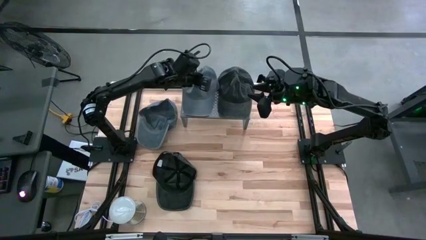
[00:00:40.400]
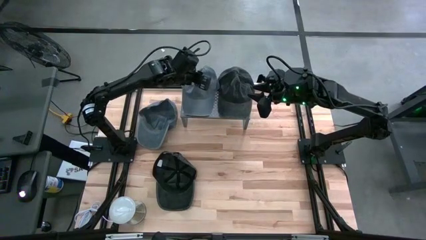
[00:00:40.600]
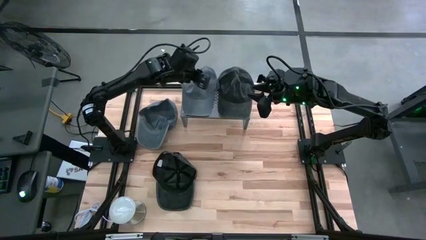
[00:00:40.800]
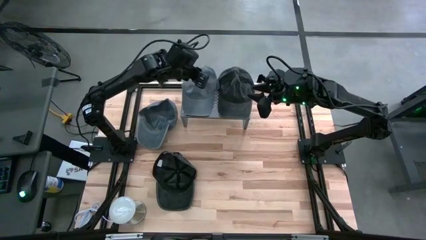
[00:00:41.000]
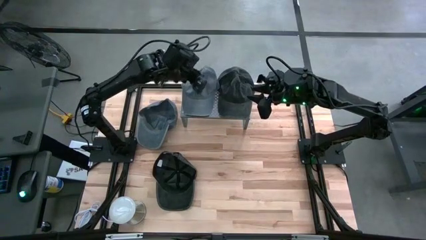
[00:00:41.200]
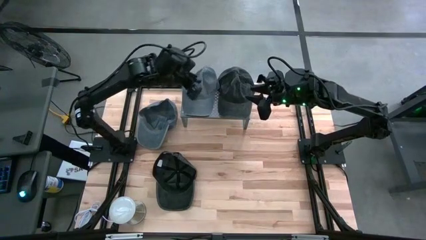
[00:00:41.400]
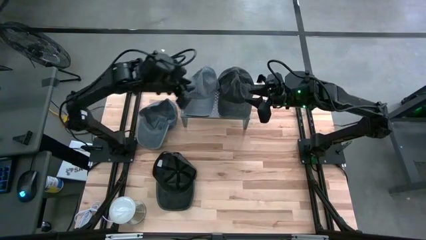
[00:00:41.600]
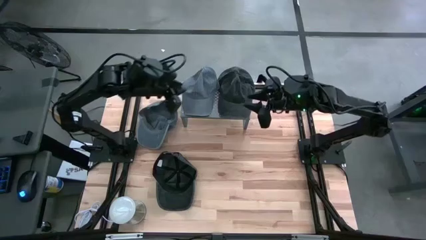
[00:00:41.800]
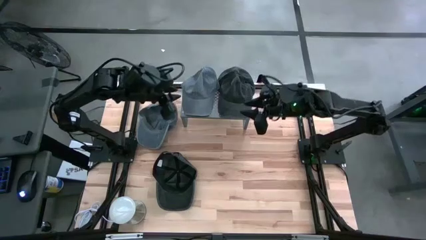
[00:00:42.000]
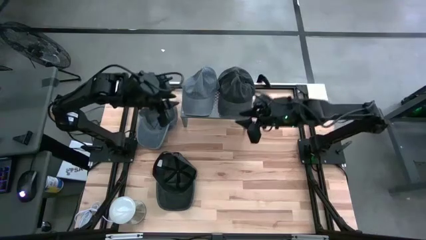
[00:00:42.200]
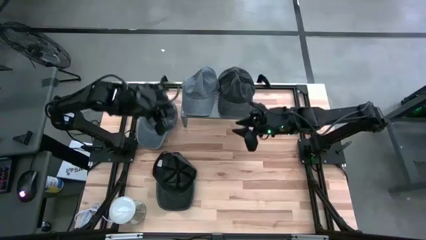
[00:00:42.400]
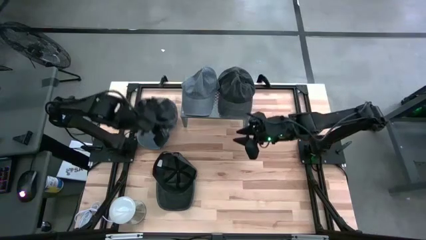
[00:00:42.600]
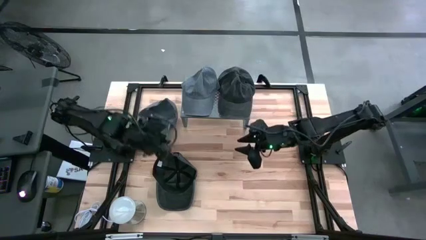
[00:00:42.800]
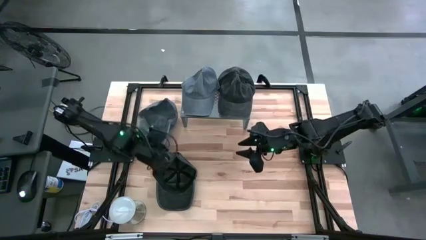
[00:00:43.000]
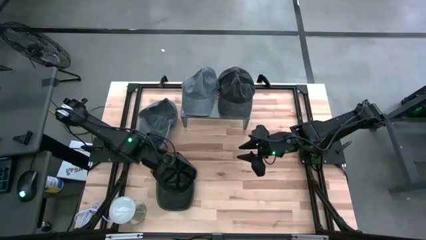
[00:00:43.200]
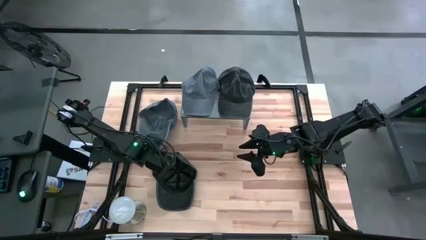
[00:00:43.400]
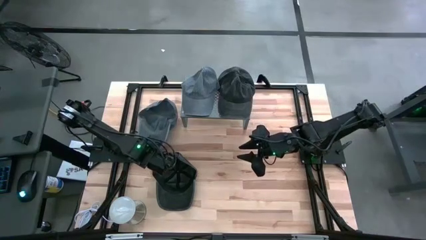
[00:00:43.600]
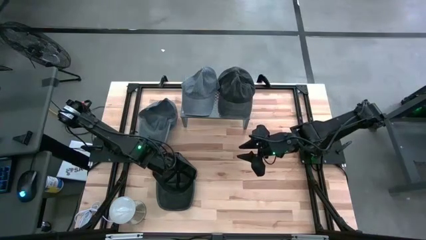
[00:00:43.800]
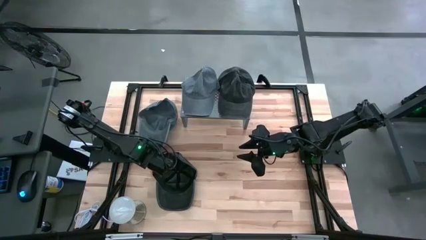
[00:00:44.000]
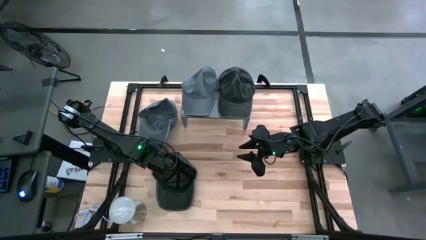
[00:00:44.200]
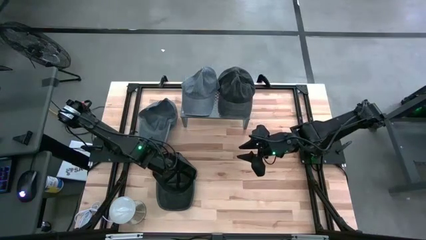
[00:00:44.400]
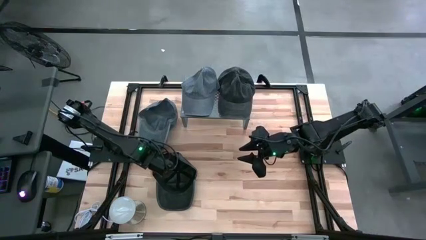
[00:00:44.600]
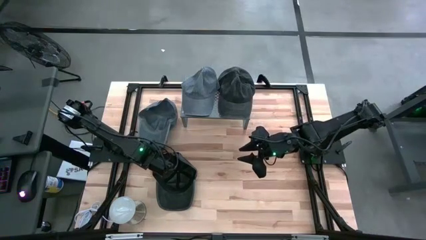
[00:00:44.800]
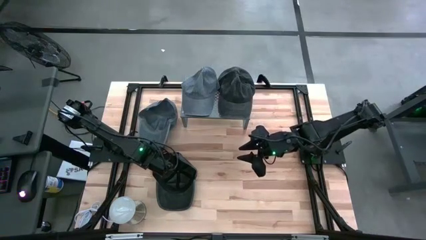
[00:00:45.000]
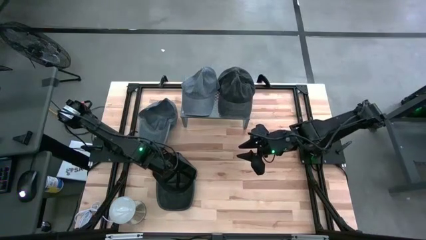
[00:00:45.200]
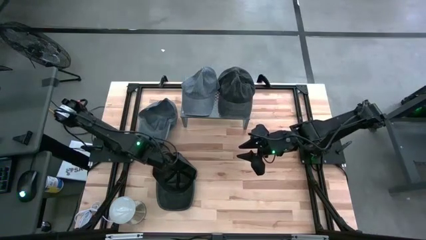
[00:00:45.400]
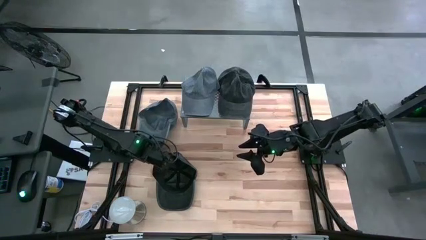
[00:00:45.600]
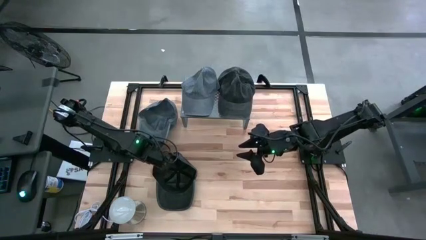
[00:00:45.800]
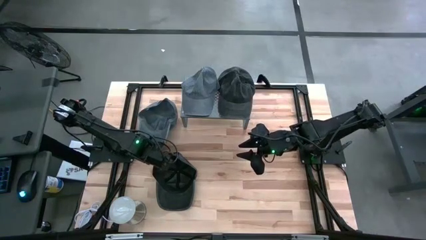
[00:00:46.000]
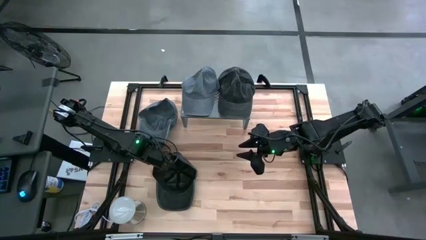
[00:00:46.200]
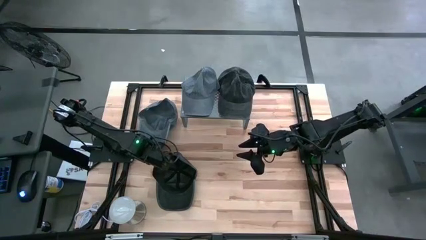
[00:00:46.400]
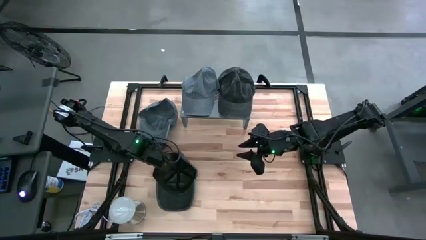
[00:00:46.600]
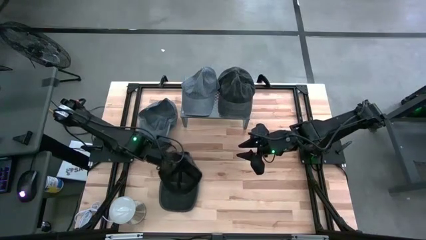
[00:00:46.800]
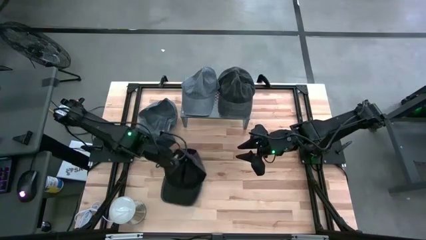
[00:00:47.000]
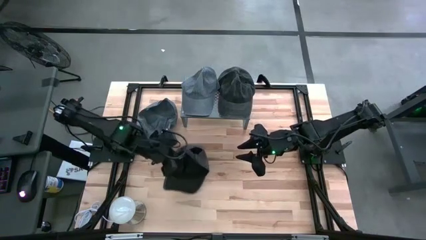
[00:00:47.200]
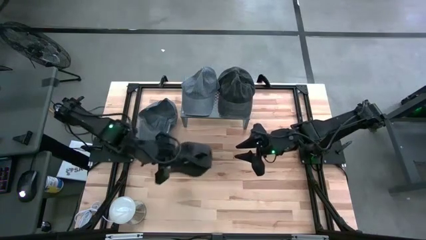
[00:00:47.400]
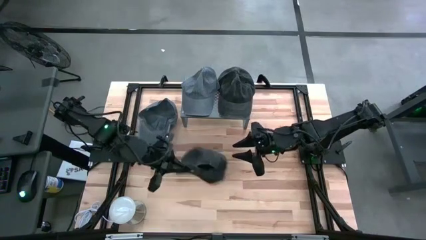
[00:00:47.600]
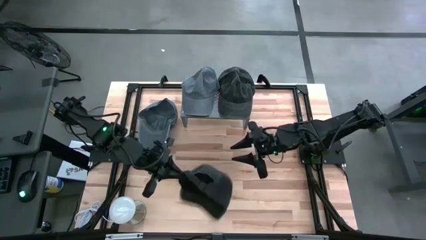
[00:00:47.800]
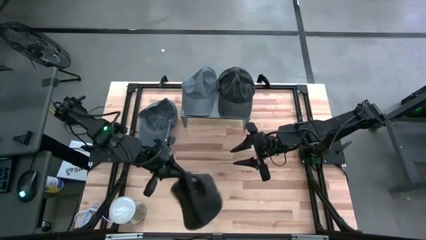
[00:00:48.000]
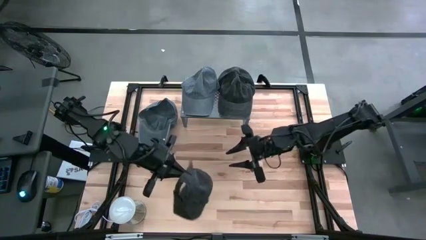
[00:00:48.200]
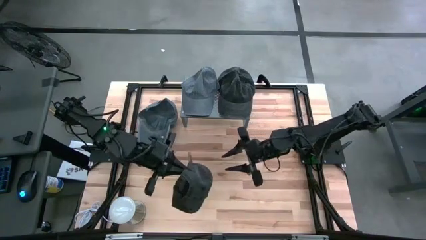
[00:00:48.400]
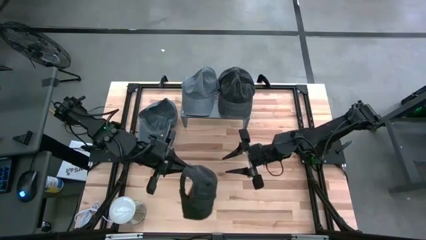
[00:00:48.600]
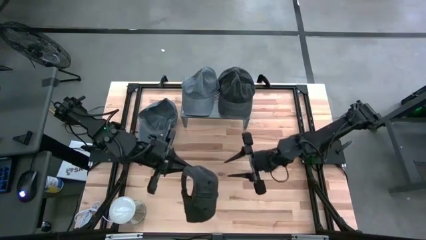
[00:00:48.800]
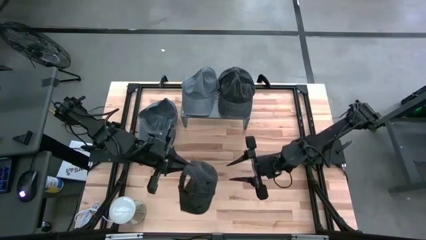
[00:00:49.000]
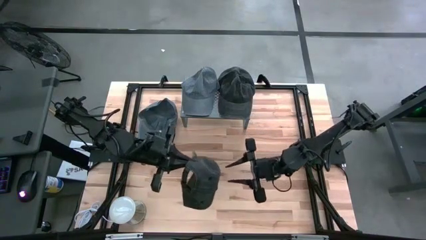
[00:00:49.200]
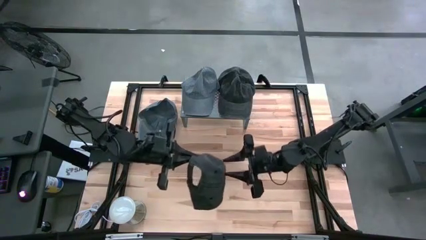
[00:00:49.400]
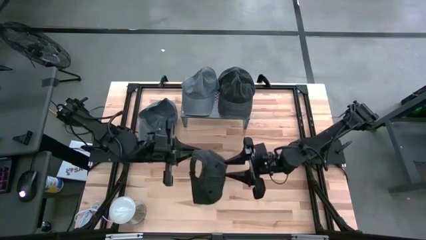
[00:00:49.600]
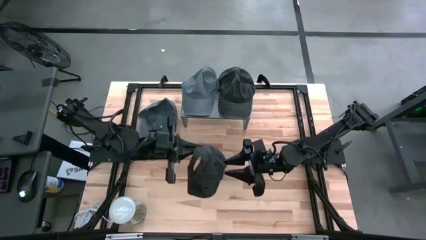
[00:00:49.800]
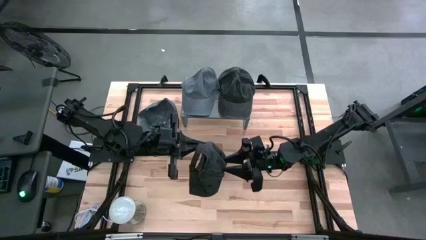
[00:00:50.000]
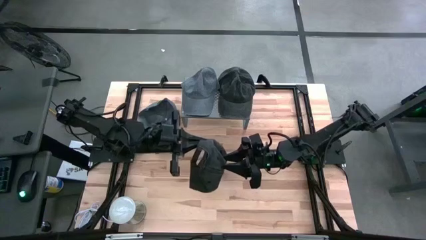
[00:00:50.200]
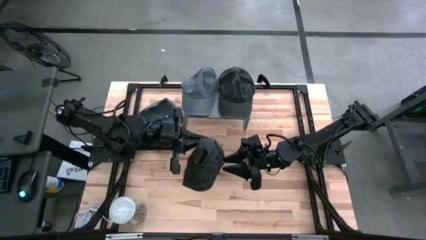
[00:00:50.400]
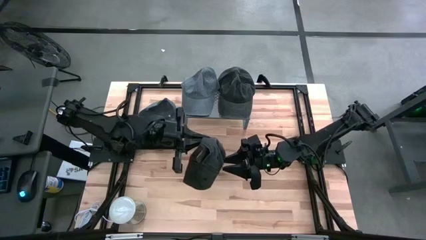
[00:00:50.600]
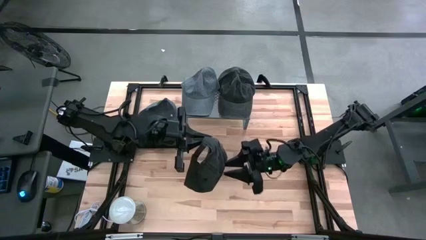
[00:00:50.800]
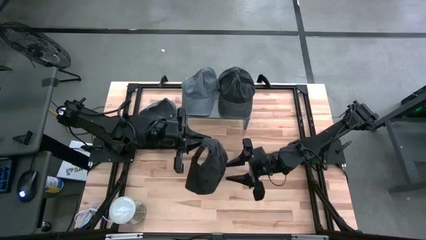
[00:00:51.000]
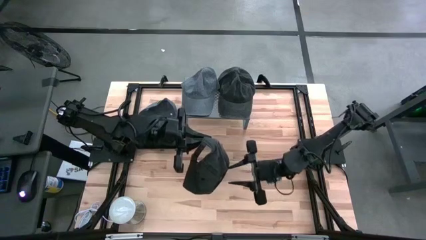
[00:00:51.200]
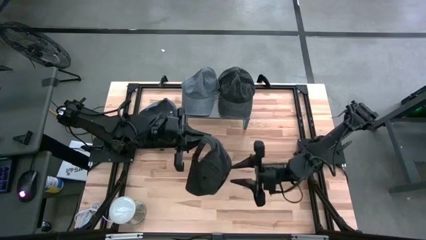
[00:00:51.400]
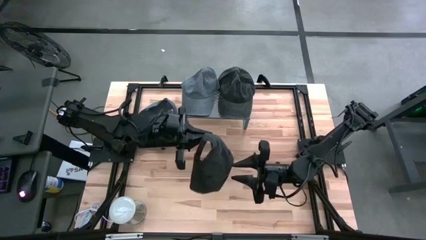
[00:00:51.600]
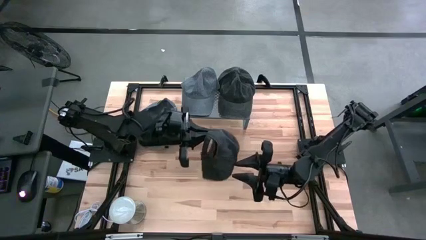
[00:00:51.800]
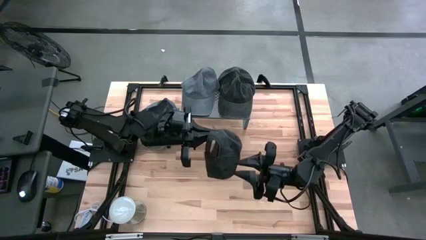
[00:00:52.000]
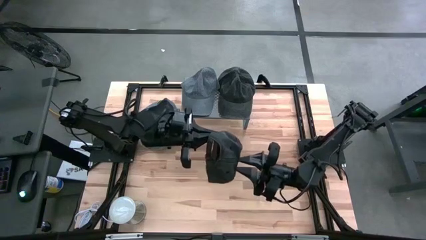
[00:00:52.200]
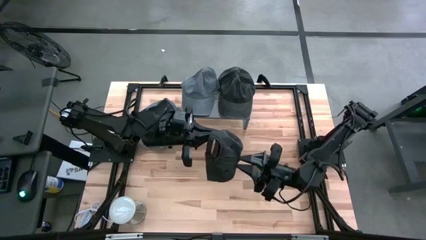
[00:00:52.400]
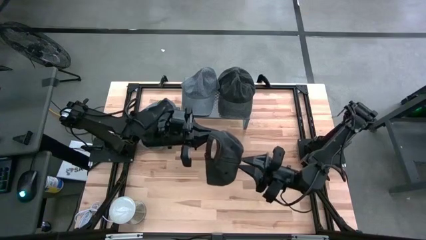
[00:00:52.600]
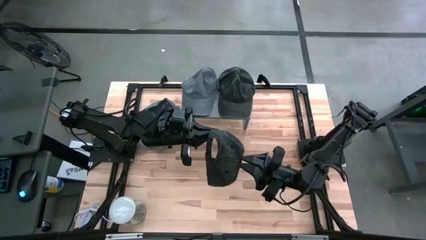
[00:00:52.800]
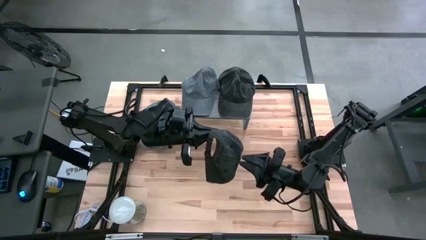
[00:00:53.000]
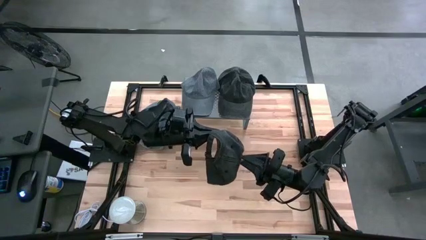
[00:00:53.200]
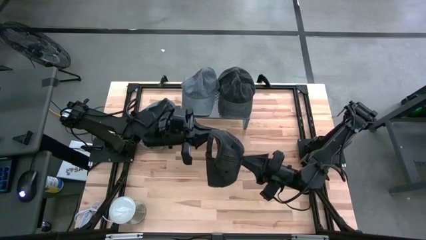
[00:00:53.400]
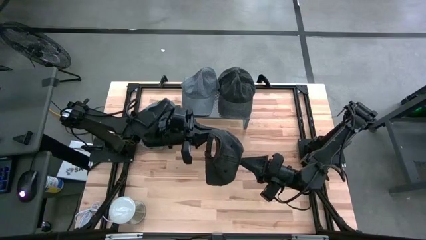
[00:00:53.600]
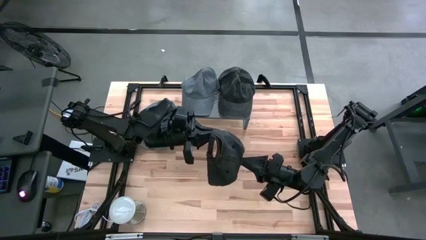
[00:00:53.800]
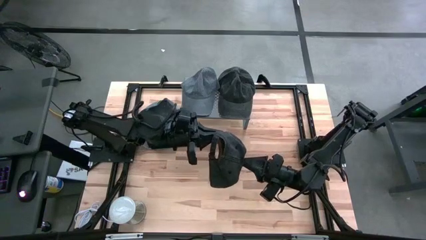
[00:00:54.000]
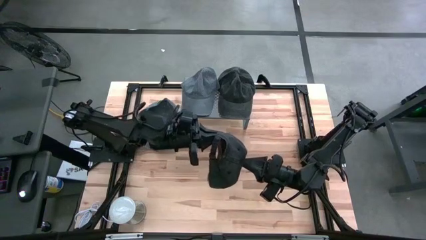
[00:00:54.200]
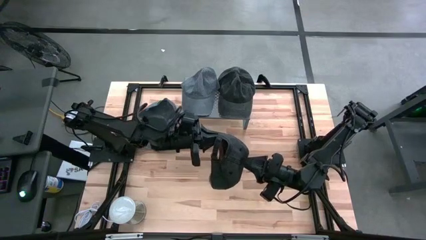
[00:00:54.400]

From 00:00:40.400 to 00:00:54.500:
Task: Pick & Place hat
Stack the black cap on top of the black cap on the shelf

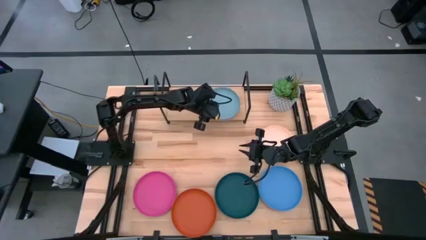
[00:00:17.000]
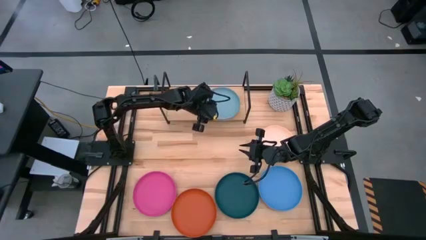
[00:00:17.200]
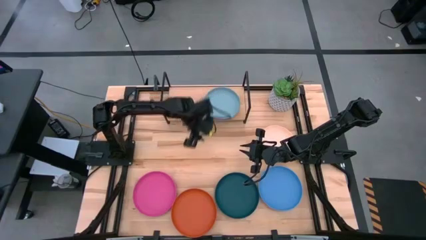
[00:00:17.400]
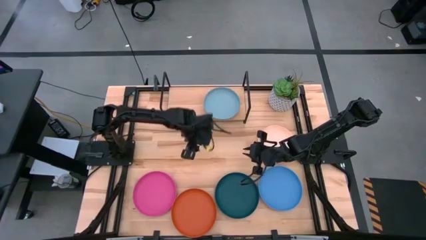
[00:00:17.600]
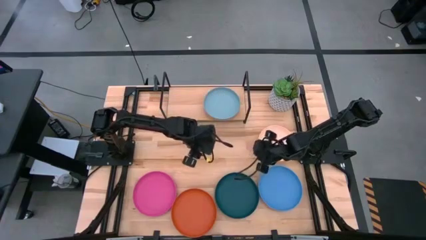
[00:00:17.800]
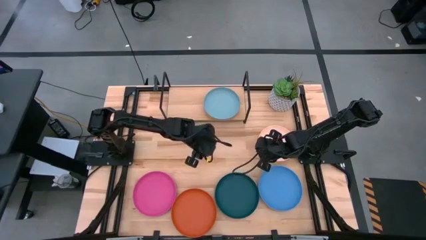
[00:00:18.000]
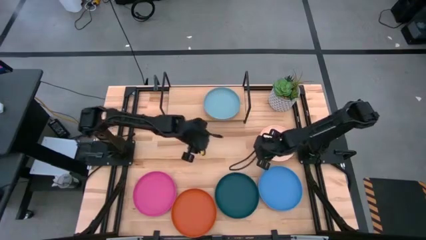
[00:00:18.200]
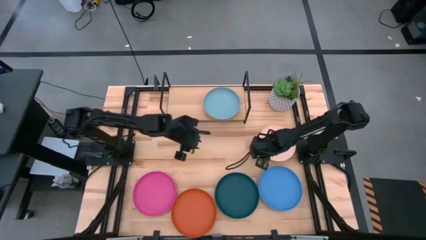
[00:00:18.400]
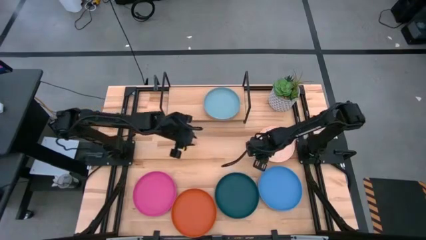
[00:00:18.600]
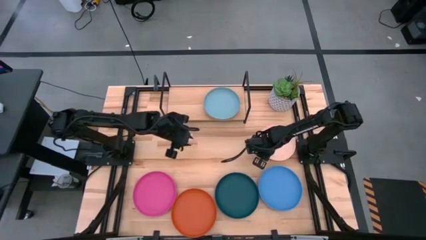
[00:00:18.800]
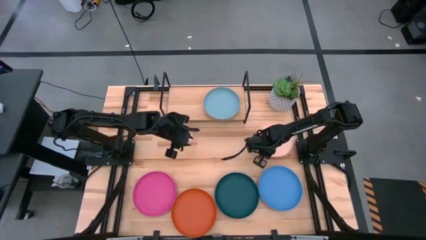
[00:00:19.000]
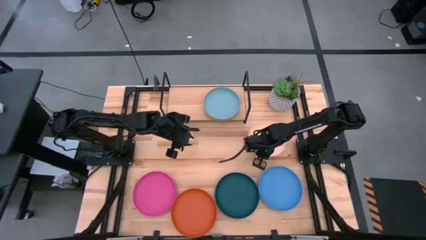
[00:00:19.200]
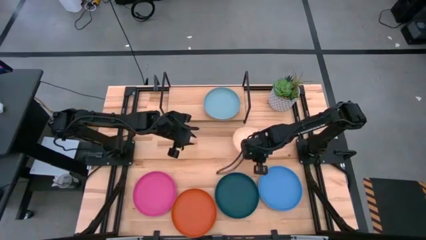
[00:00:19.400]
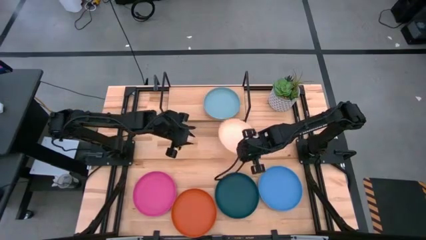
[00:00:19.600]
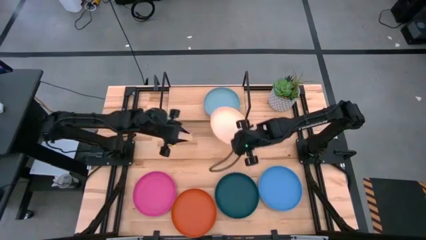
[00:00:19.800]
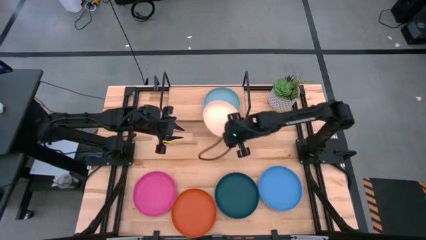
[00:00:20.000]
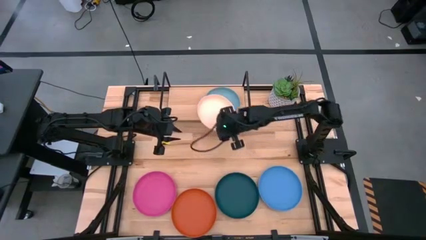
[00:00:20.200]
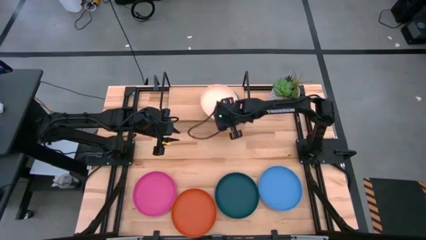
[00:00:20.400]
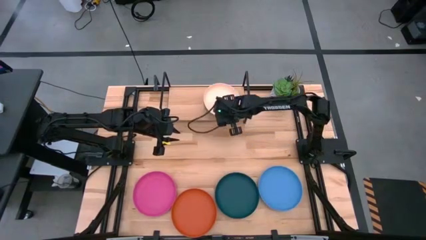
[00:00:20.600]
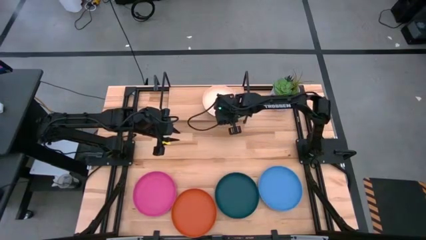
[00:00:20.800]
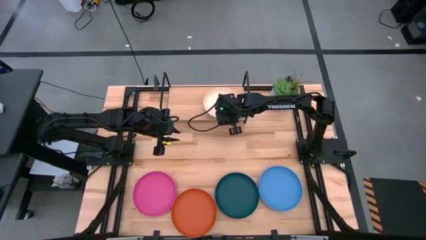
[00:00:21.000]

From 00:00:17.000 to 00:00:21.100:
Task: Place and stack plates onto a shelf
Stack the white plate on top of the stacked plates on the shelf
